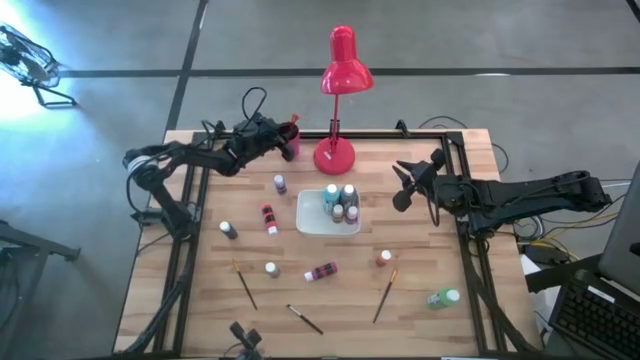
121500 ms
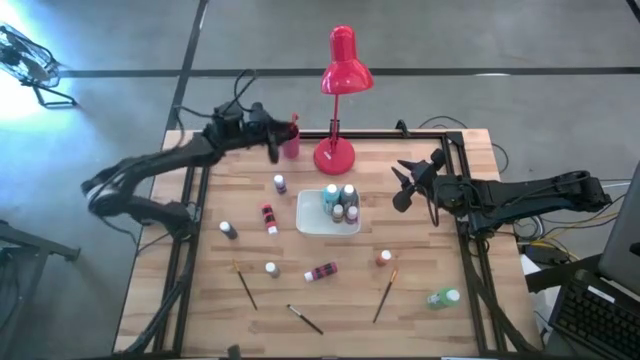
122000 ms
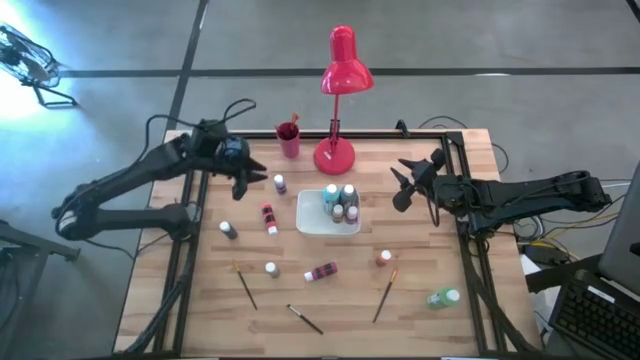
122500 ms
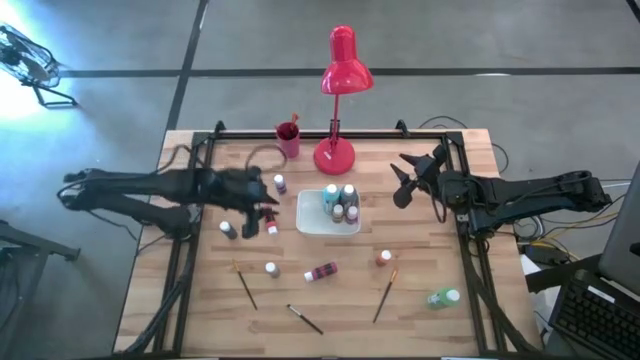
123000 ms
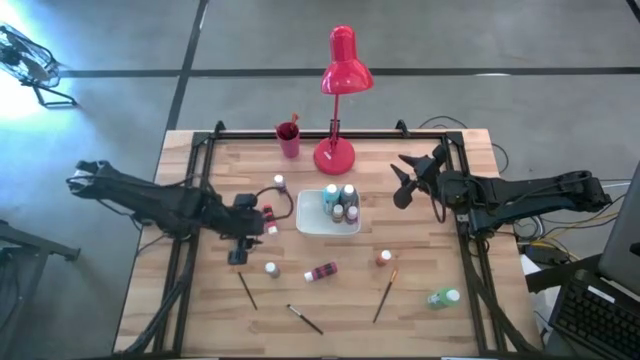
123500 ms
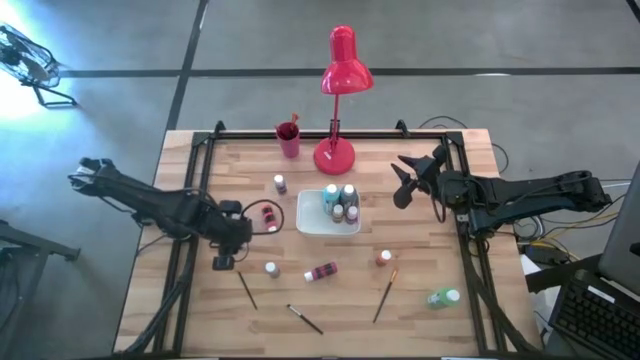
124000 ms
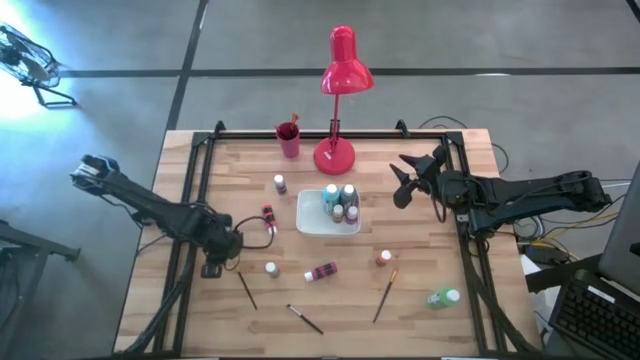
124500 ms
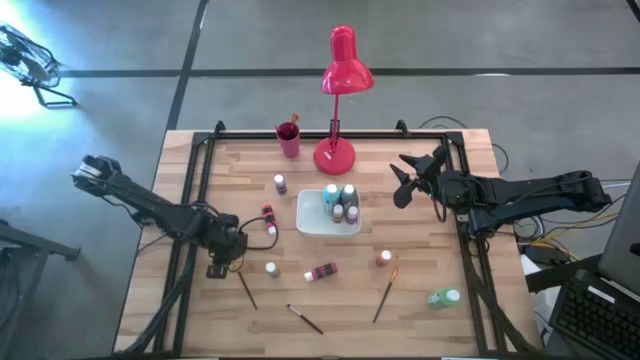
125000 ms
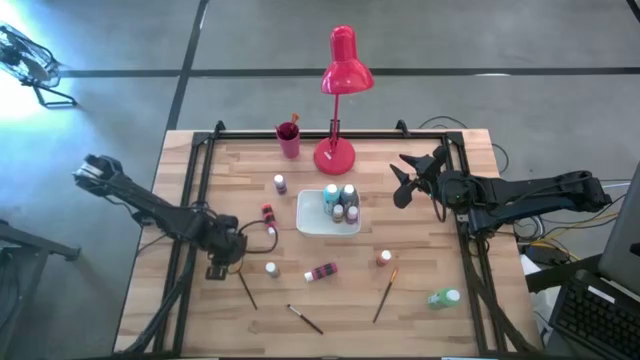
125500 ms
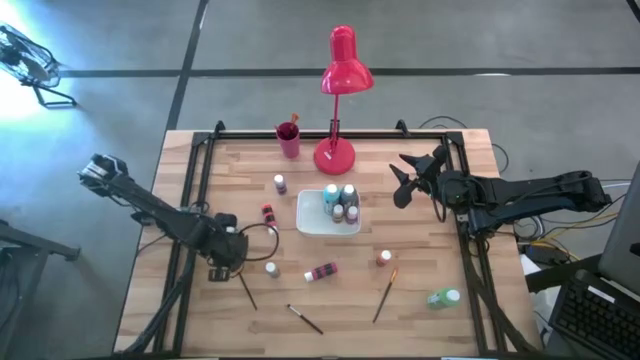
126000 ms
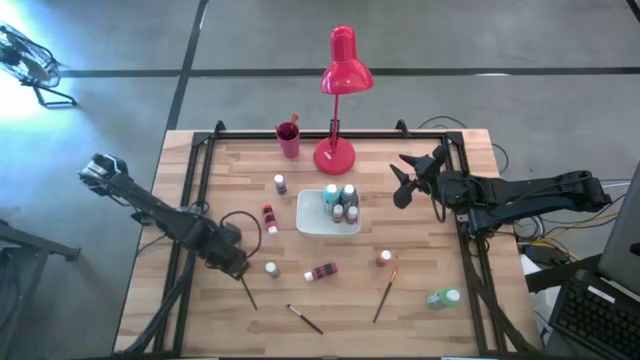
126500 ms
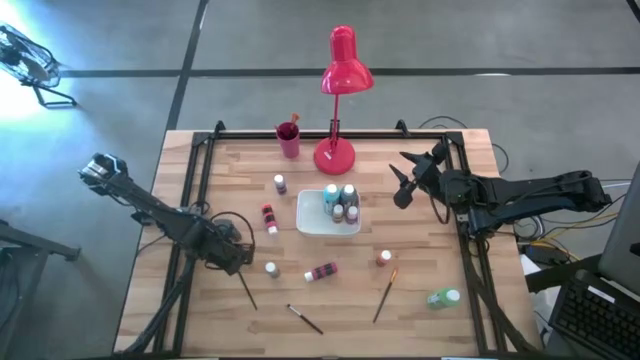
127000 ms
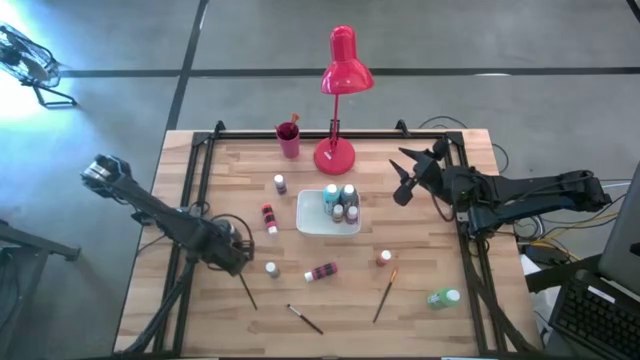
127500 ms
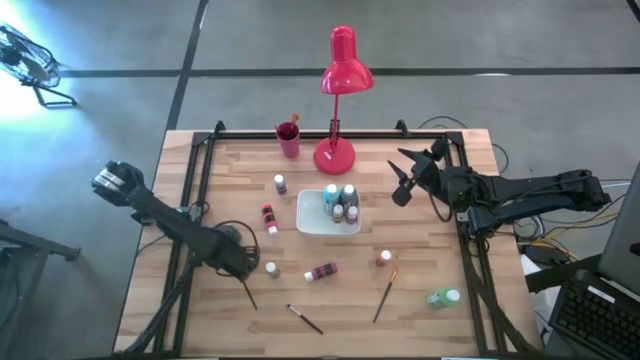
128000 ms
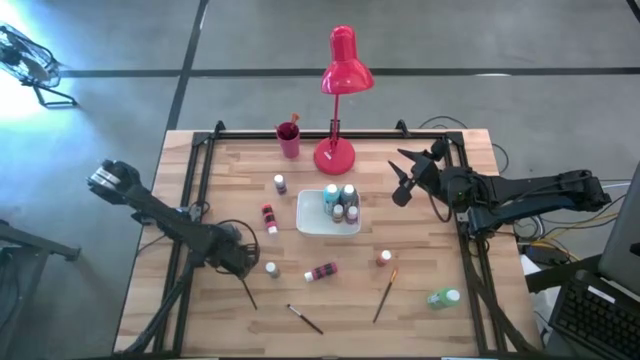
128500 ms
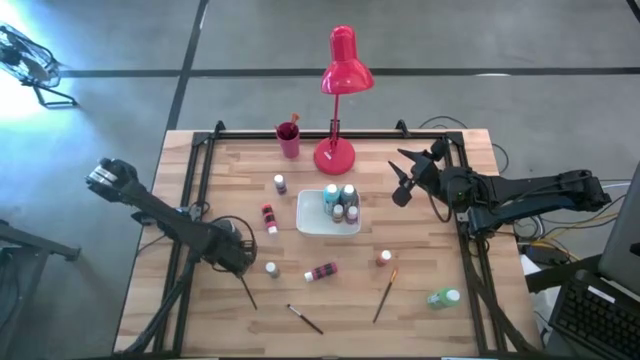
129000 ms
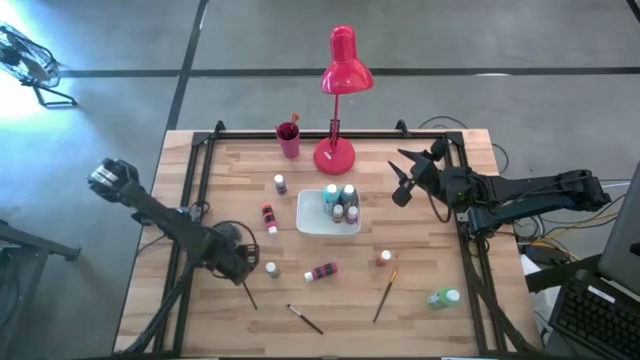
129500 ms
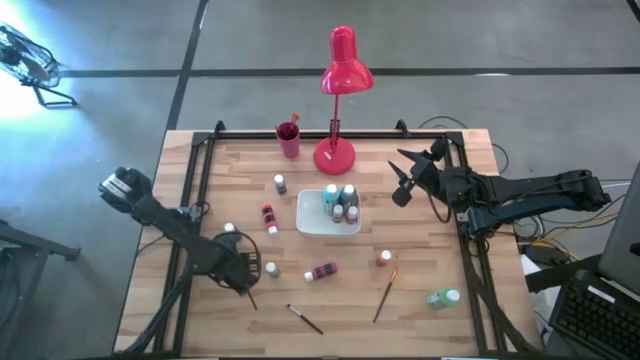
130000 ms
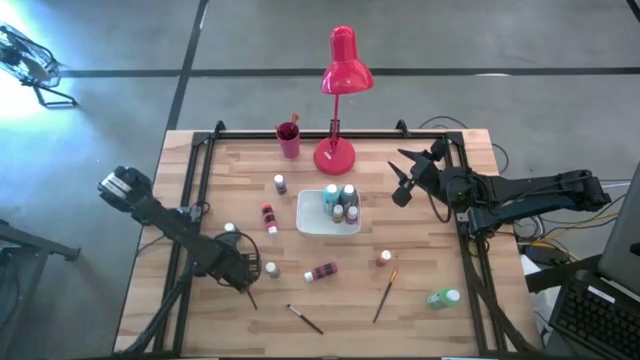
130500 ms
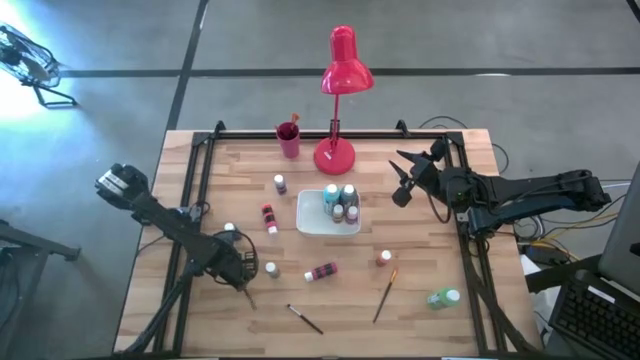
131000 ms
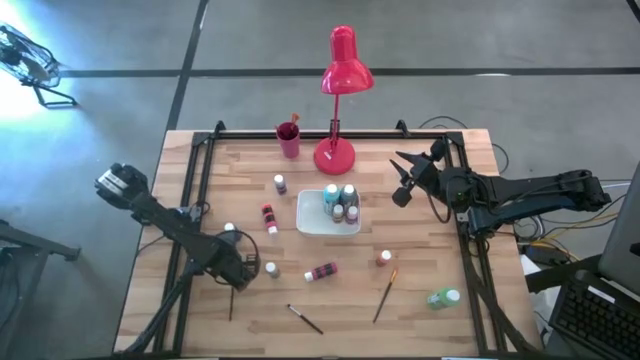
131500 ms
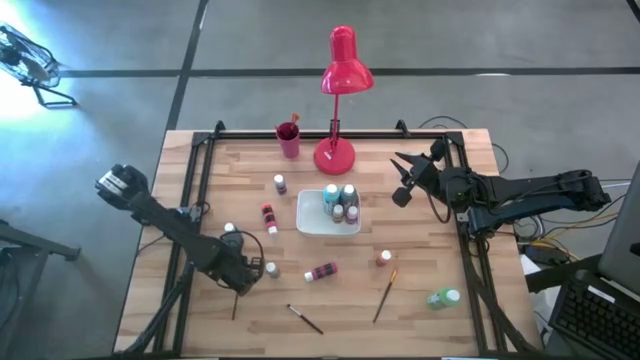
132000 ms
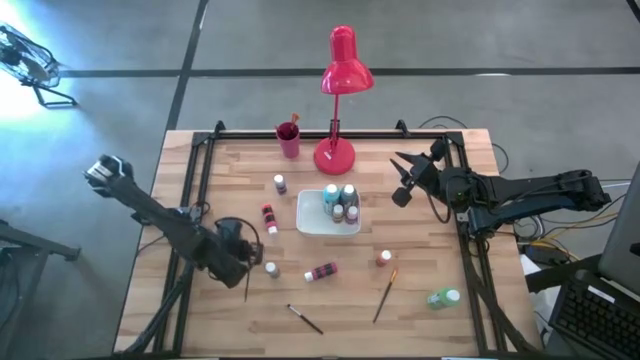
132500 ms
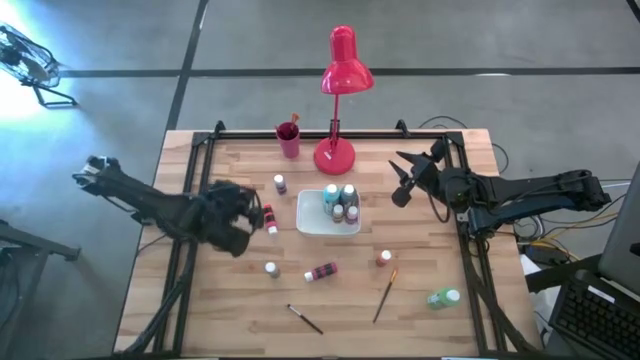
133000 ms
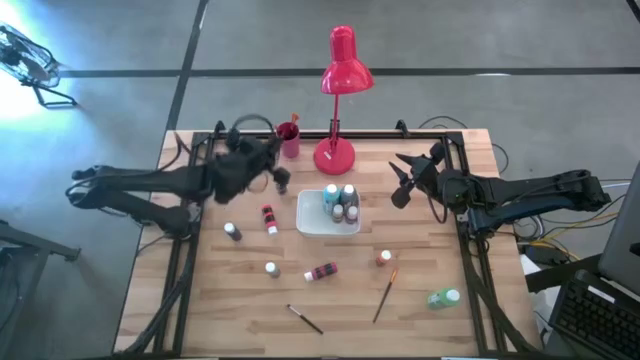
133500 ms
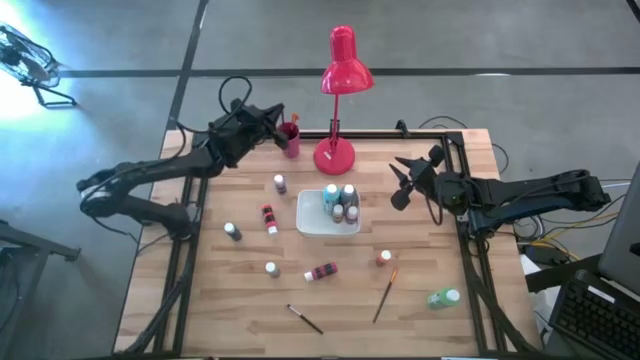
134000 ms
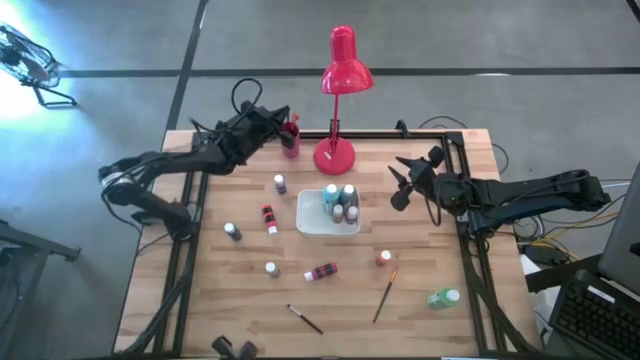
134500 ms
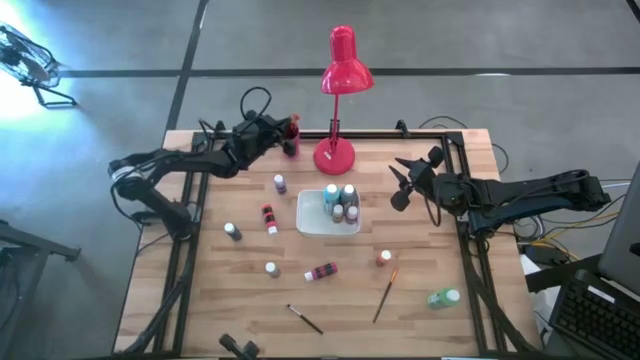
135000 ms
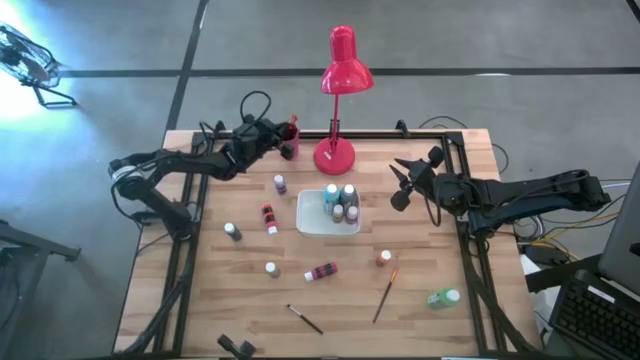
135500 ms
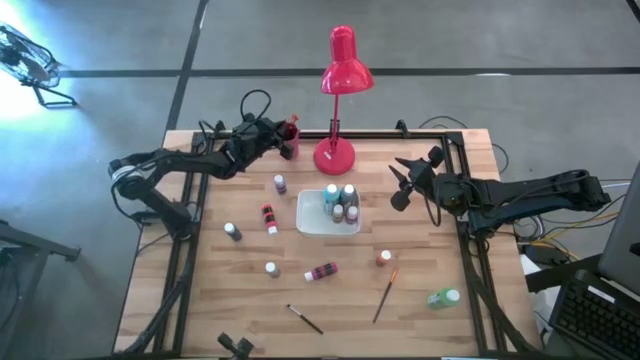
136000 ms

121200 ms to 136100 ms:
Task: Pick & Place Paint Supplies
Put the gold paint brush into the red cup

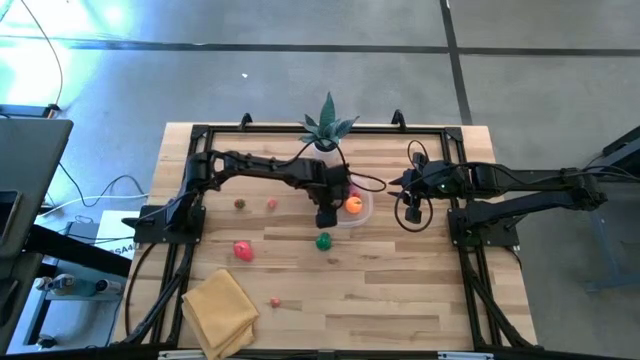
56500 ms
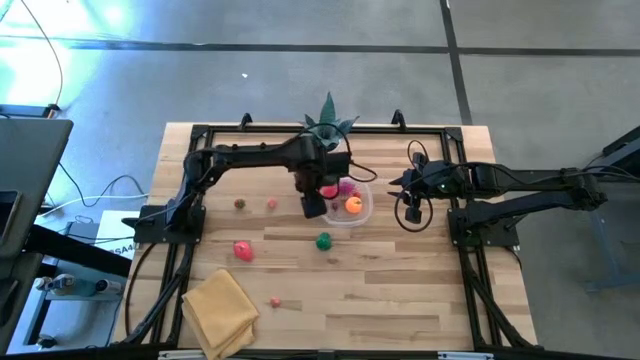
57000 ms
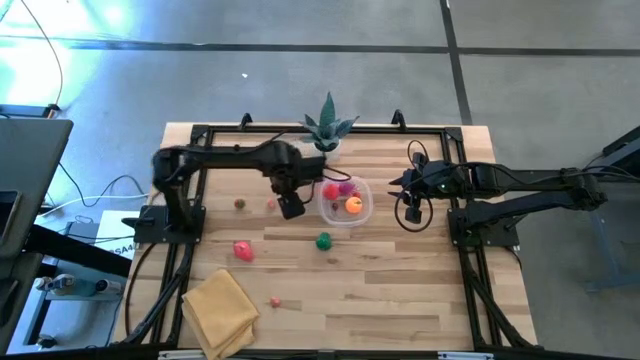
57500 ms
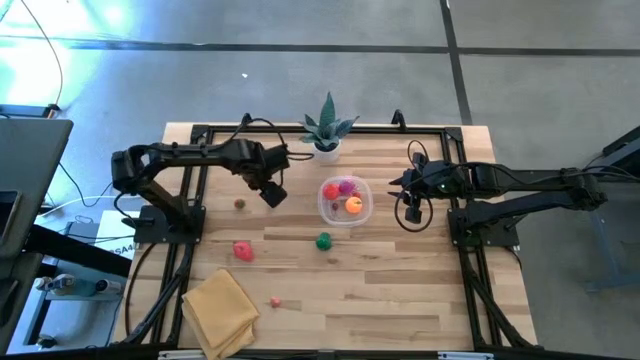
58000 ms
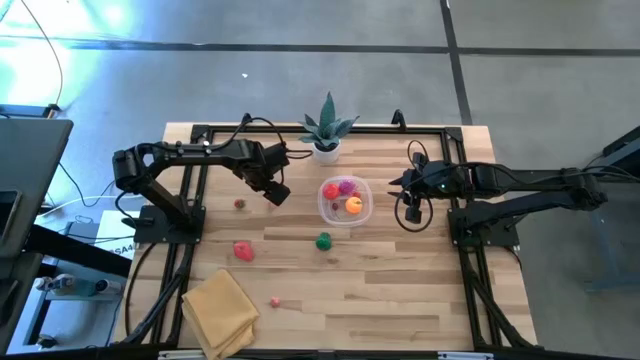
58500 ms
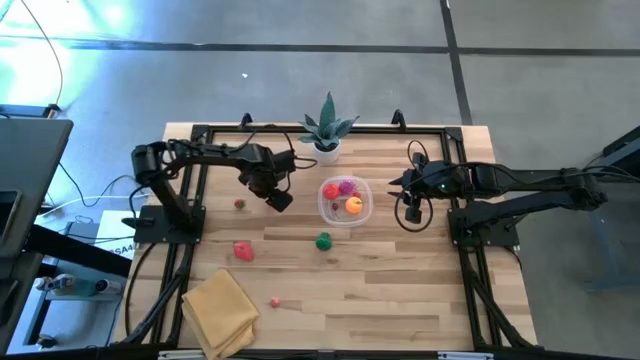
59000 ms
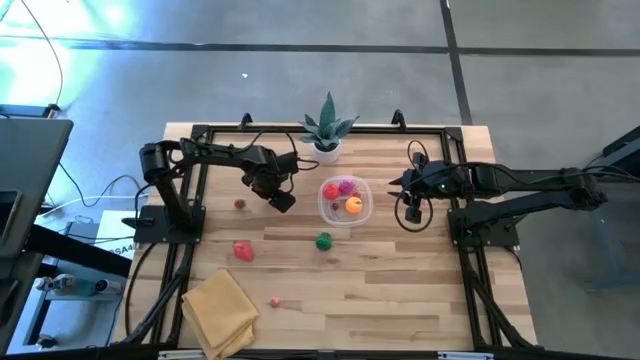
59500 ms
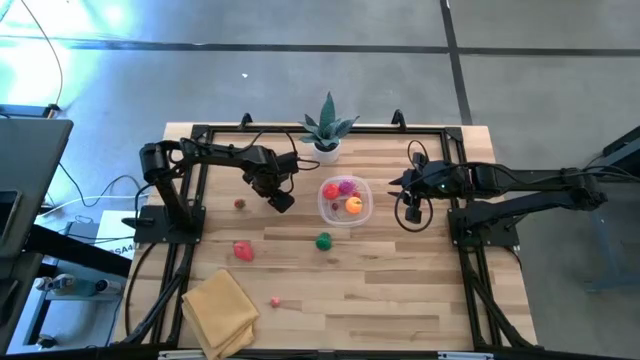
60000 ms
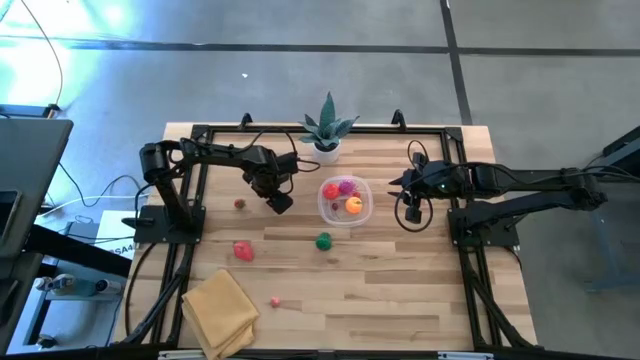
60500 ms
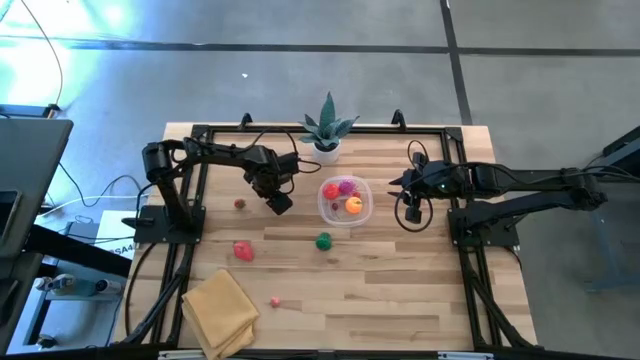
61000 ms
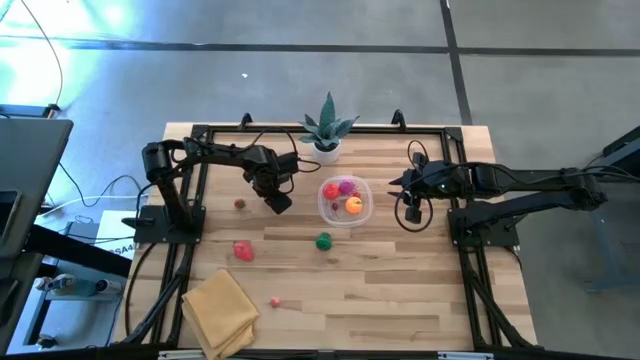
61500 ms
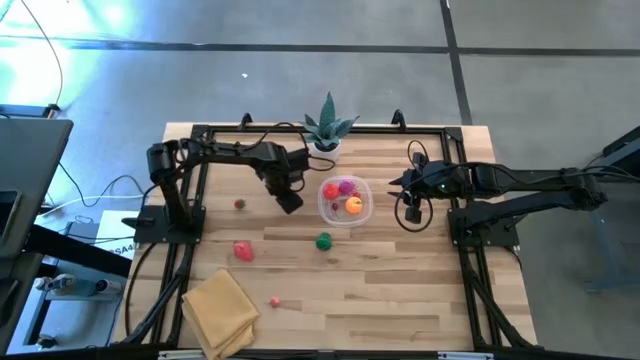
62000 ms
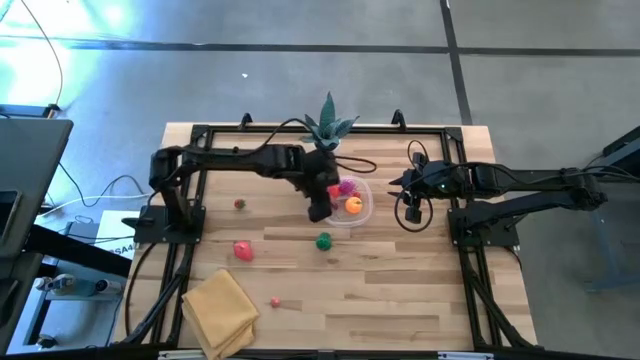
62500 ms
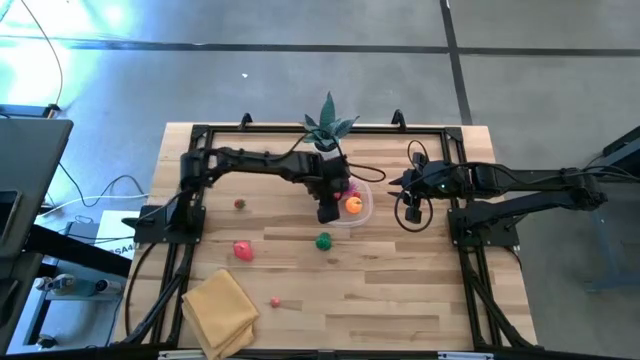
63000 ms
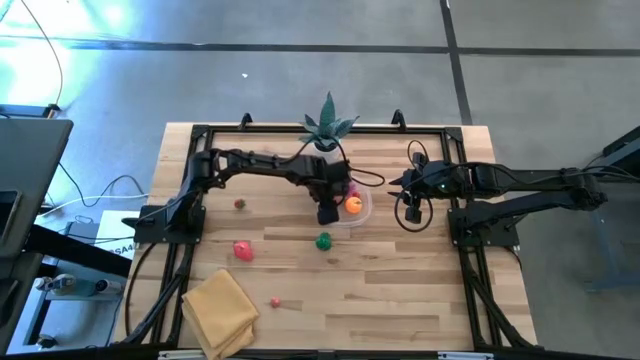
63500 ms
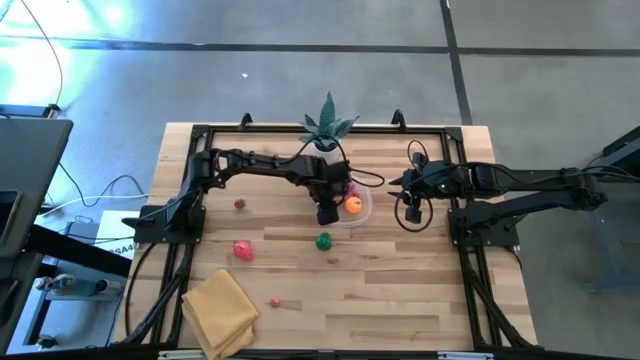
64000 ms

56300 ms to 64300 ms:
Task: Pick and placing Produce into tupperware
Put the top pink peach into the transparent container
